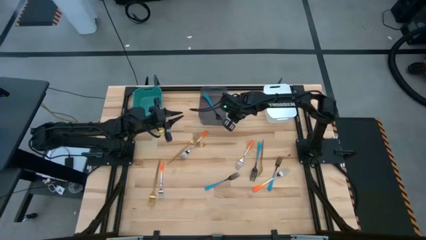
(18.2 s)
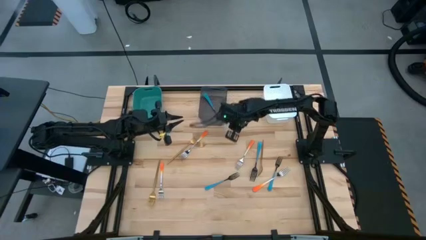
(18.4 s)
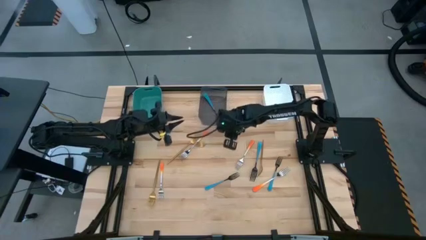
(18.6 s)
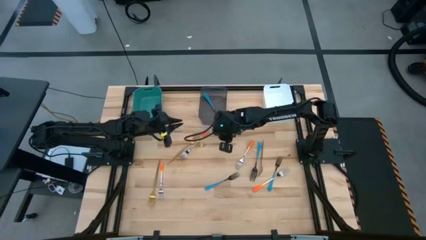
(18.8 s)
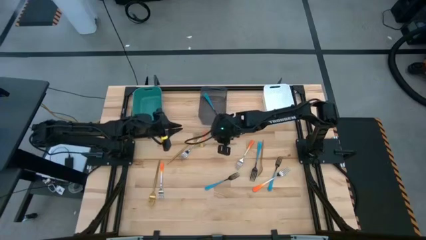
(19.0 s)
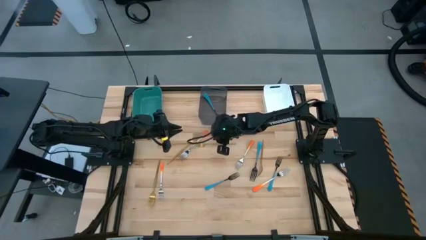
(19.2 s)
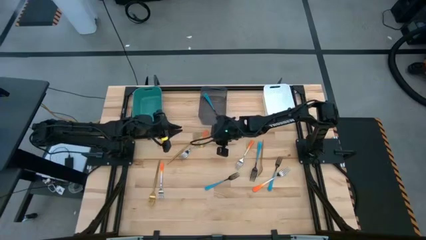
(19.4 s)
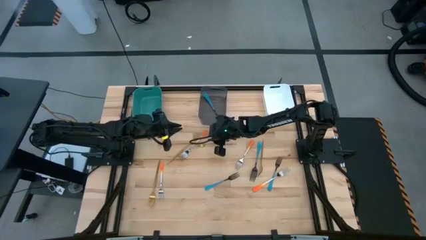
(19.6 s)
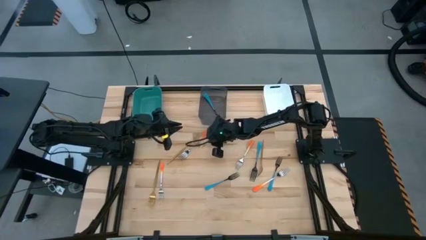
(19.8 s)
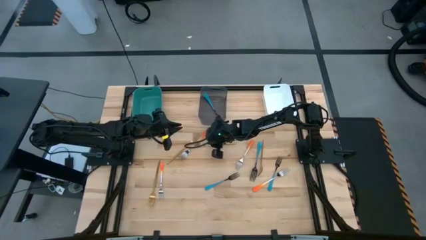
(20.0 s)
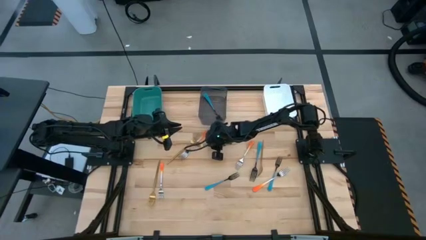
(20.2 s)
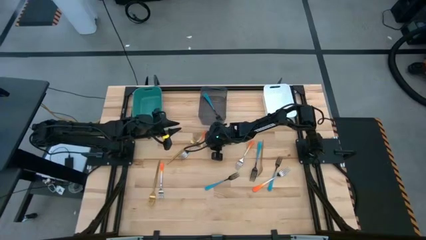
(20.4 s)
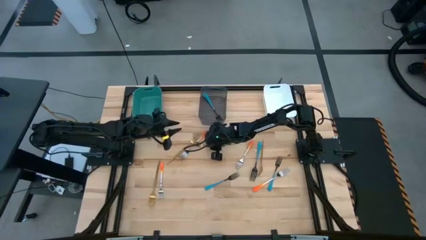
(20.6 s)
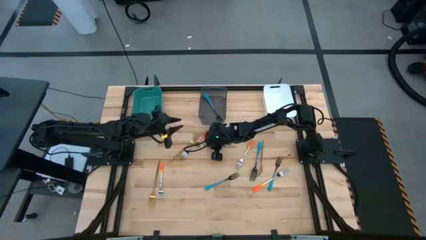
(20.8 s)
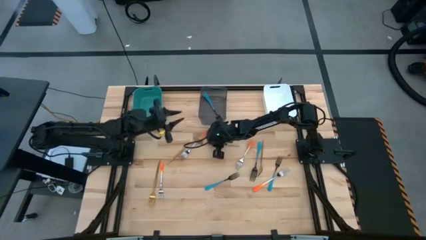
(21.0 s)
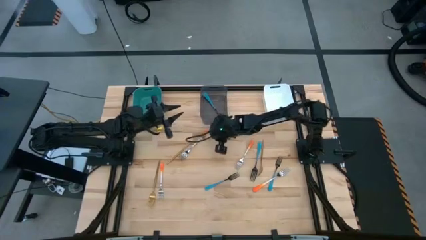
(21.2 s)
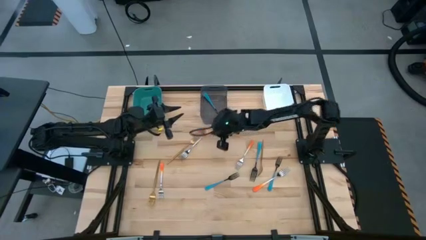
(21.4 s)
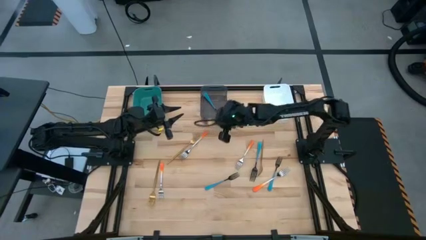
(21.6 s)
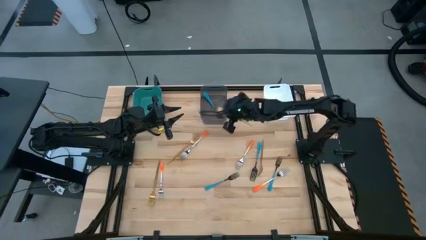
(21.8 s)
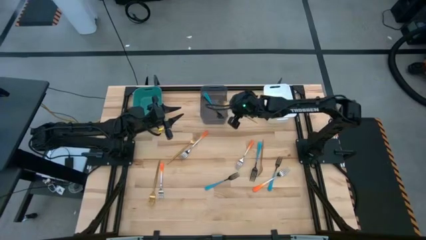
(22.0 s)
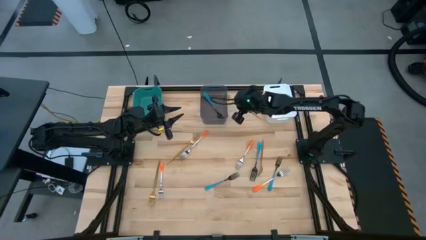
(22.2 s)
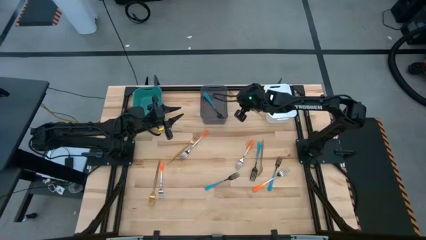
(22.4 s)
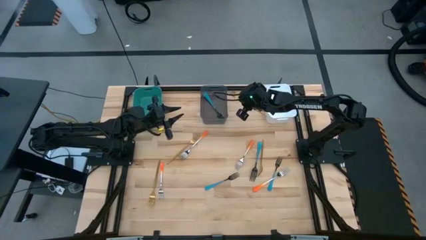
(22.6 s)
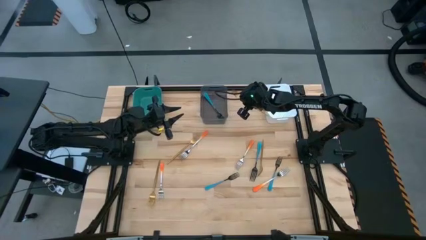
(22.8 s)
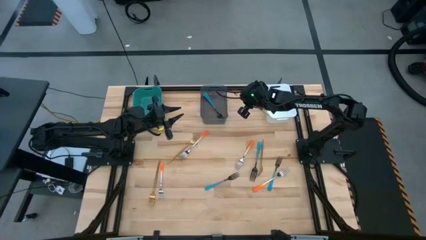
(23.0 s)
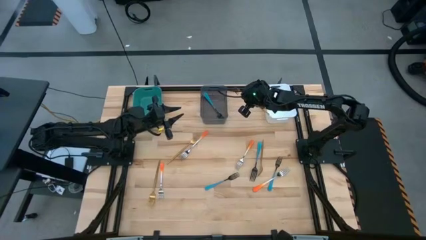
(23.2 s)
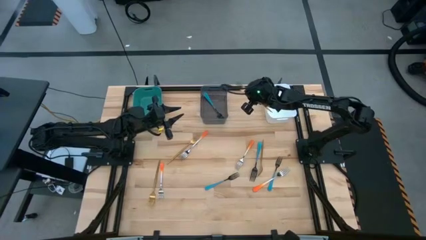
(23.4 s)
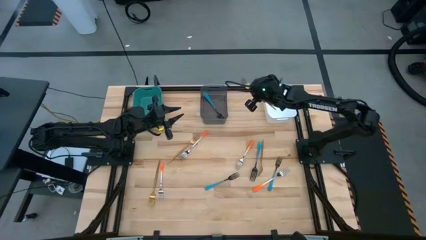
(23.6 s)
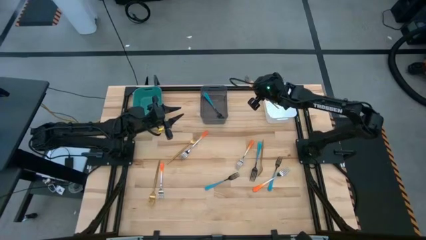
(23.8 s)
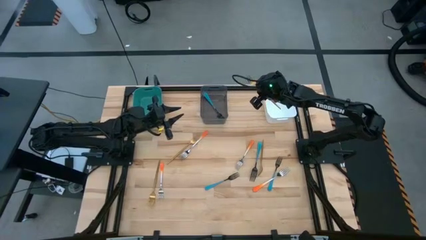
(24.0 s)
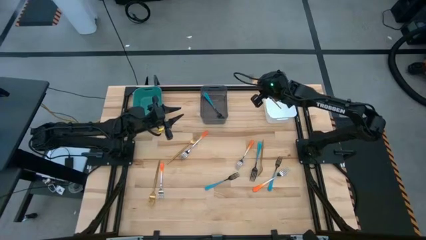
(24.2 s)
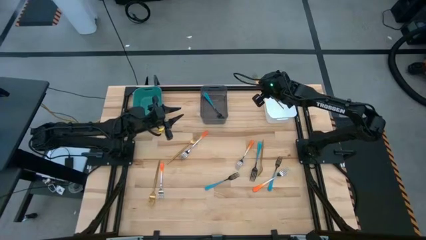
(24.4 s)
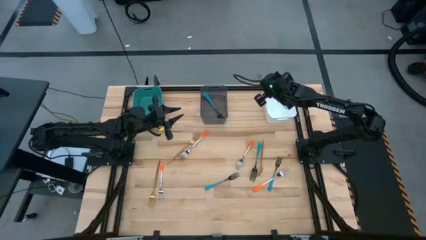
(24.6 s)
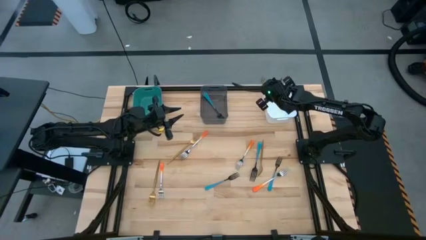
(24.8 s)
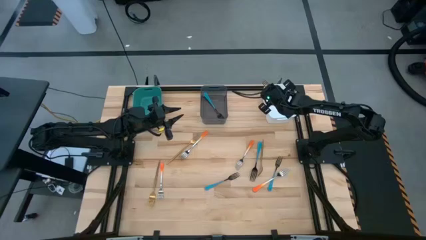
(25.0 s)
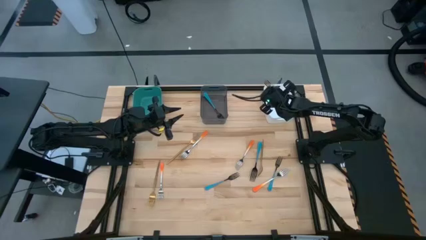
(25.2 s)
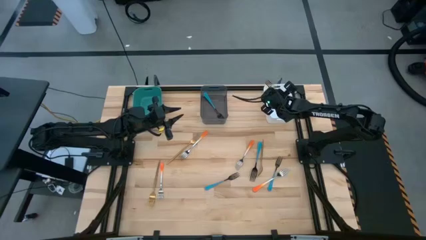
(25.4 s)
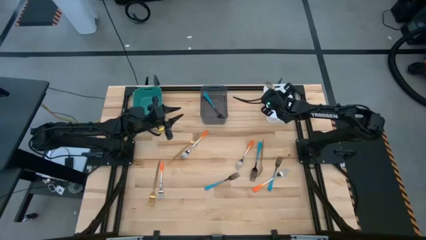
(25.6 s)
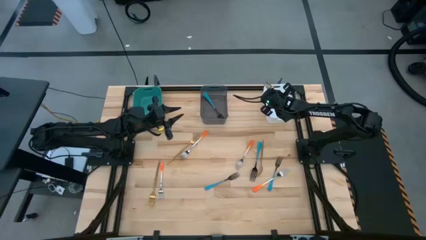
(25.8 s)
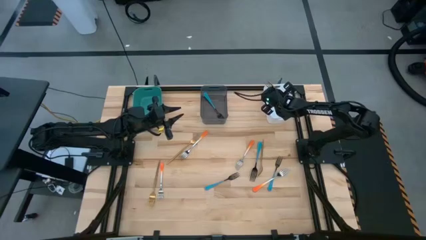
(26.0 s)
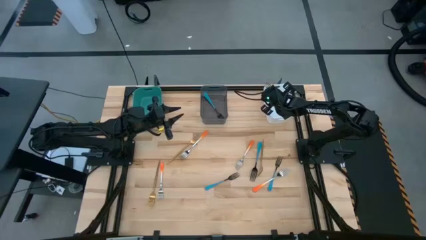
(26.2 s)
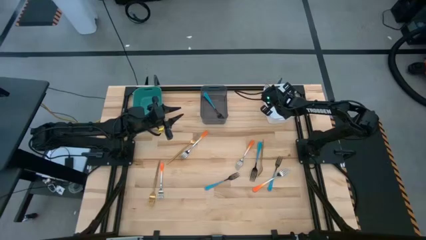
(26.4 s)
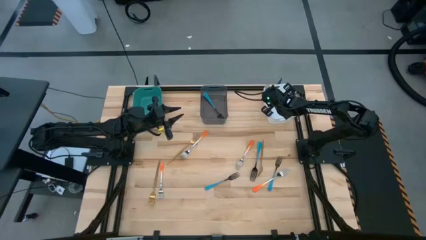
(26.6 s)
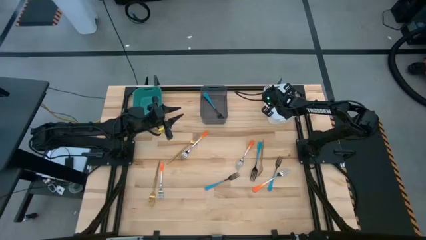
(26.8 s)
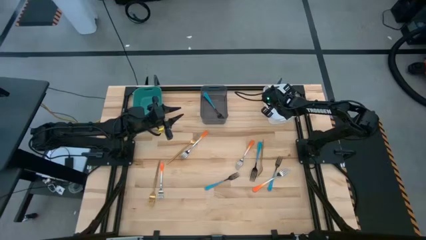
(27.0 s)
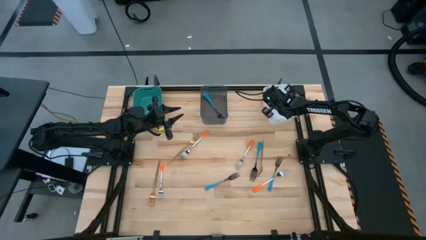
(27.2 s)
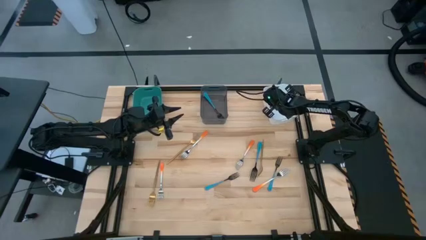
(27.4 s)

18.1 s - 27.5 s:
Task: Sort silverware by color (type)
Put the top right gold fork into the white bin
